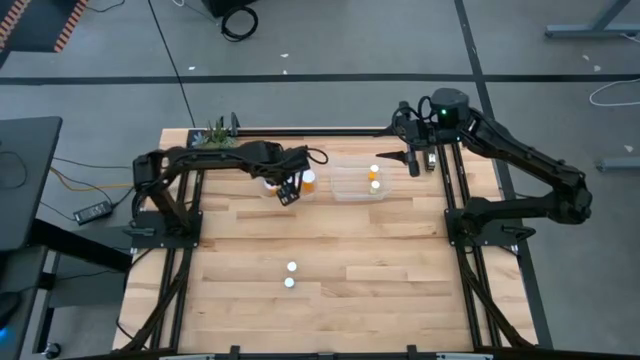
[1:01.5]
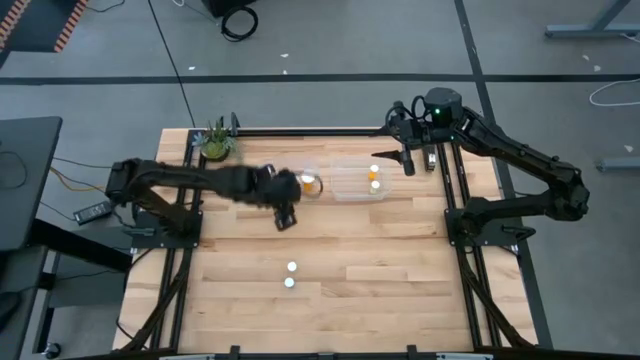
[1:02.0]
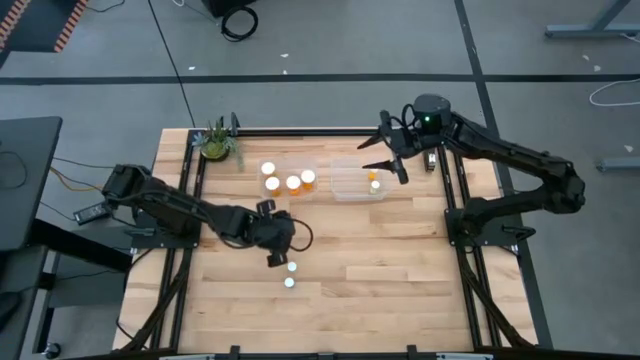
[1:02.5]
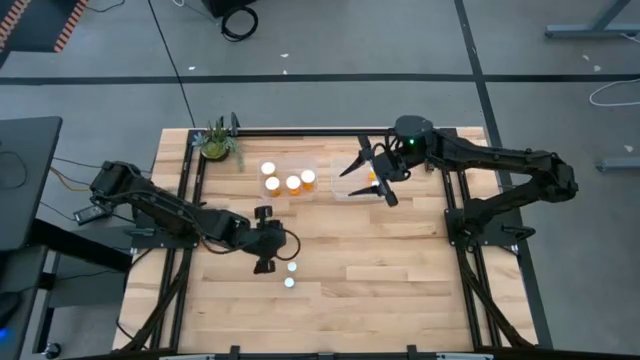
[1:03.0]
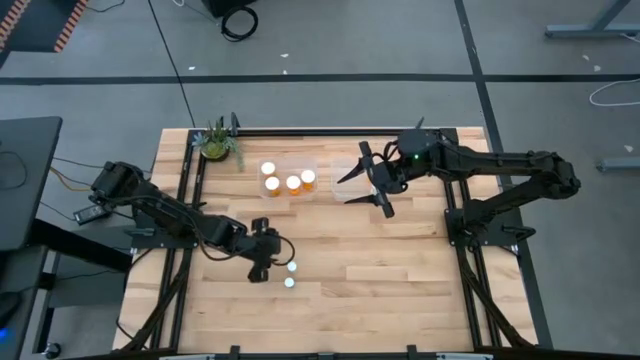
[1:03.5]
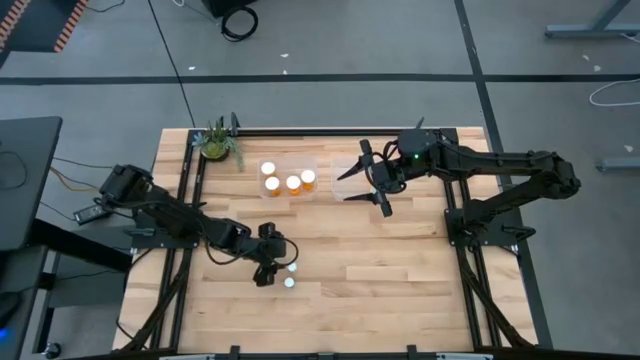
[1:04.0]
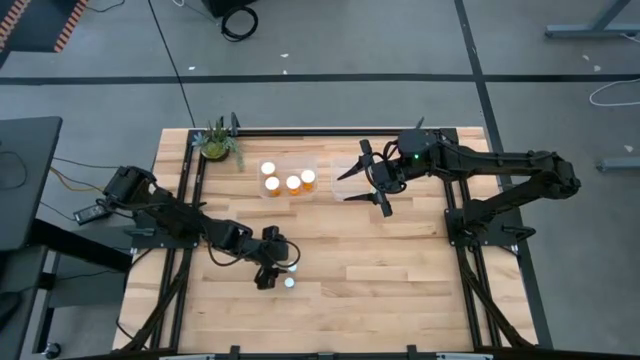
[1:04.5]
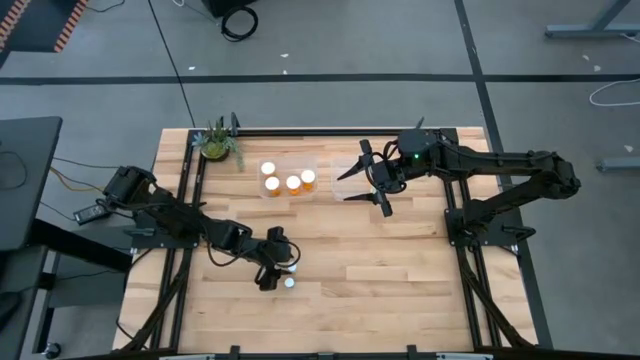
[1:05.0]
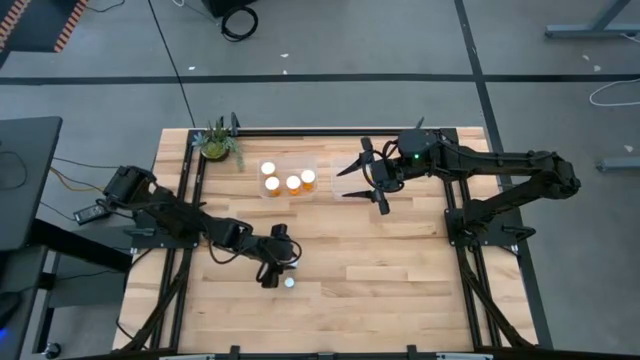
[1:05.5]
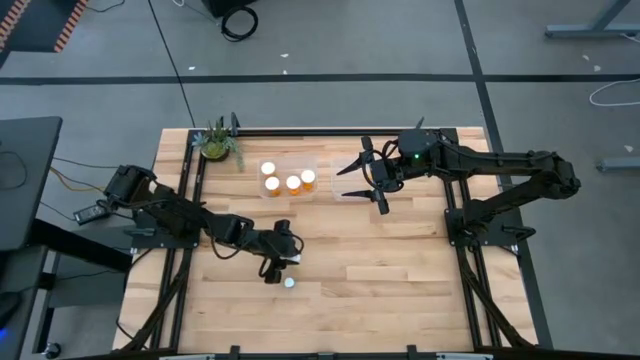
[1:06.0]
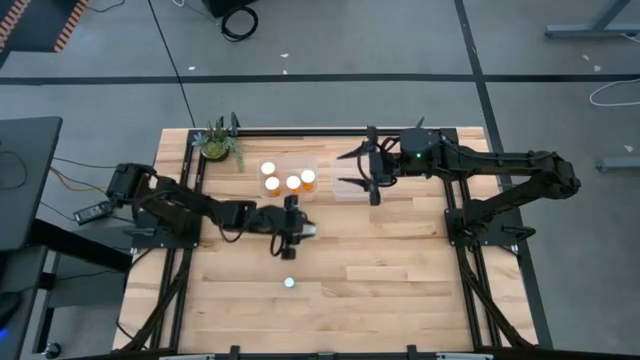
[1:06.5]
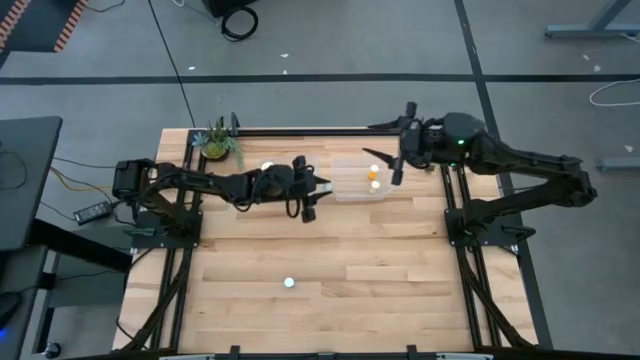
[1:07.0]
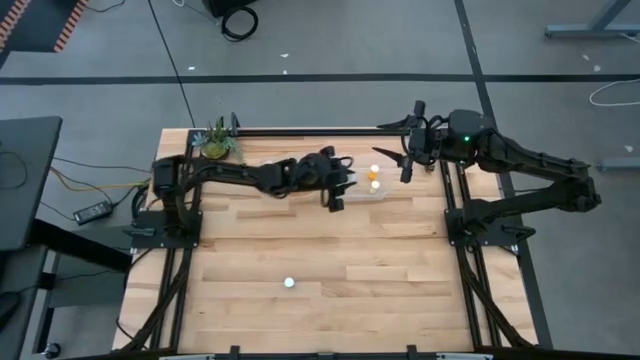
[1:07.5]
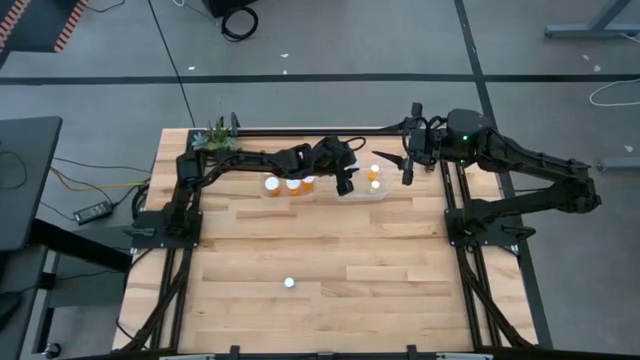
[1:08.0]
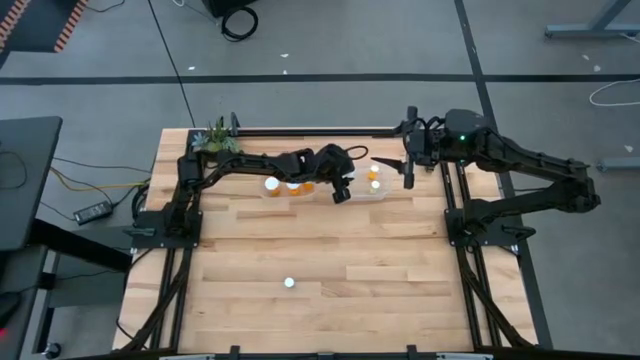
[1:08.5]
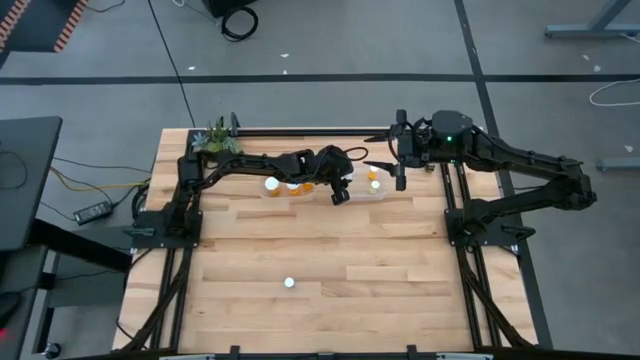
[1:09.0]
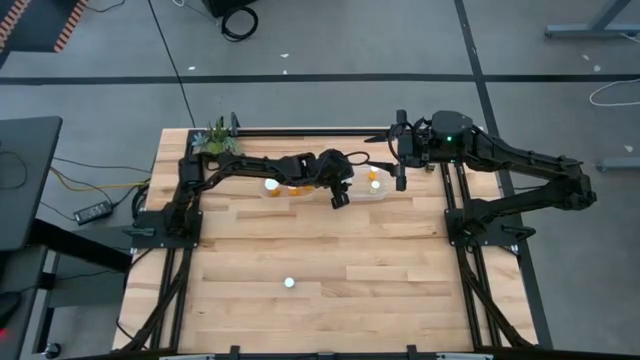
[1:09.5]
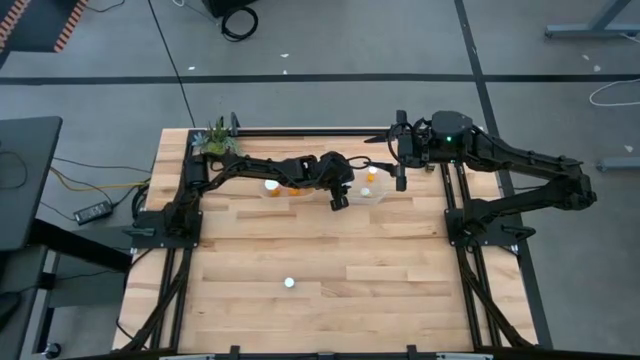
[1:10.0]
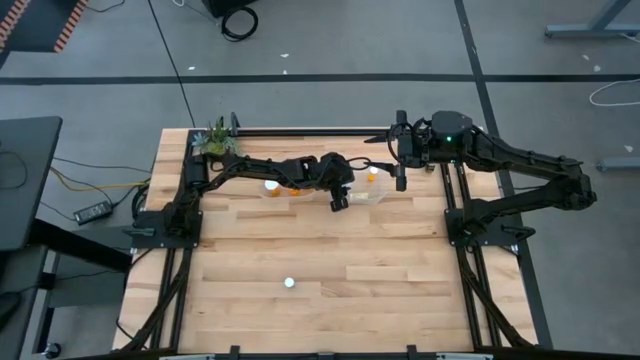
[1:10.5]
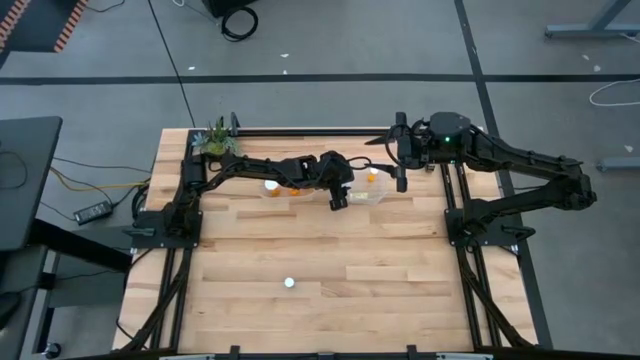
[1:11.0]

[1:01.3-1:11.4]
Task: Pick and place medicine bottles into bin by pill shape (circle, oval)
Put the small yellow pill bottle into the right transparent bin

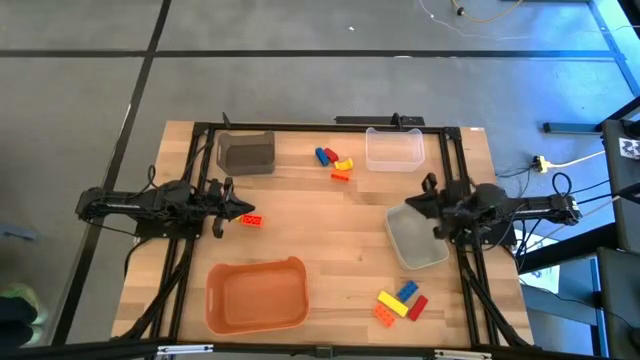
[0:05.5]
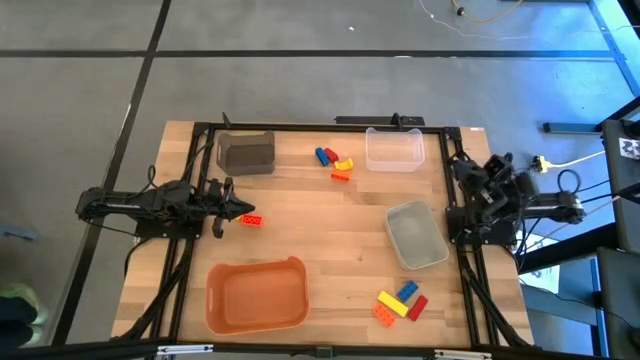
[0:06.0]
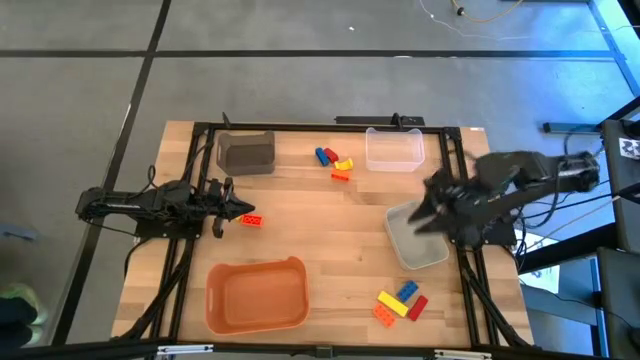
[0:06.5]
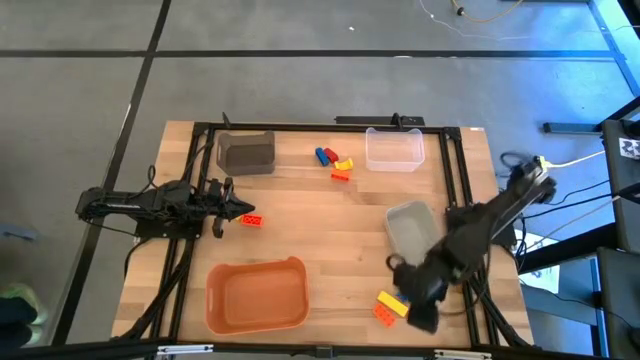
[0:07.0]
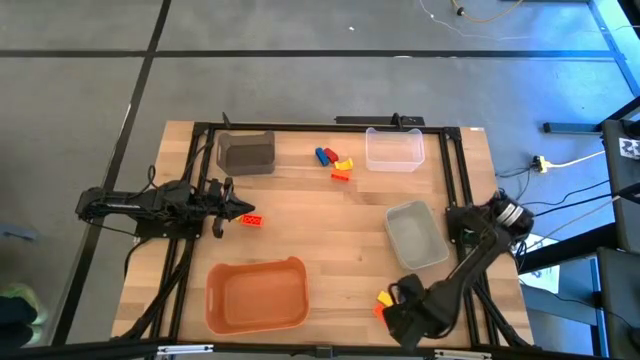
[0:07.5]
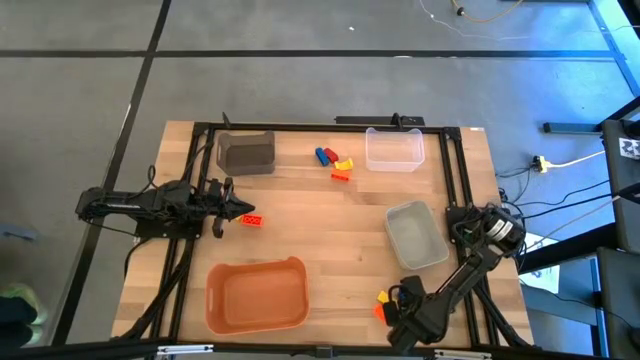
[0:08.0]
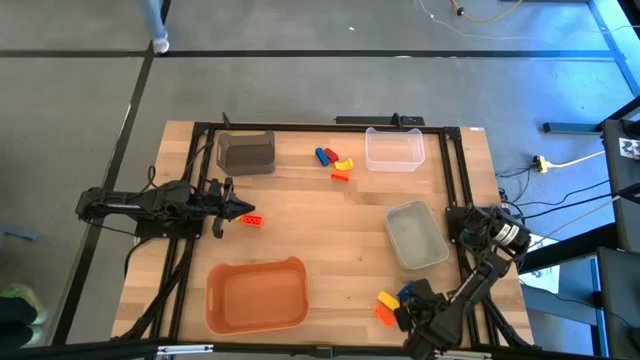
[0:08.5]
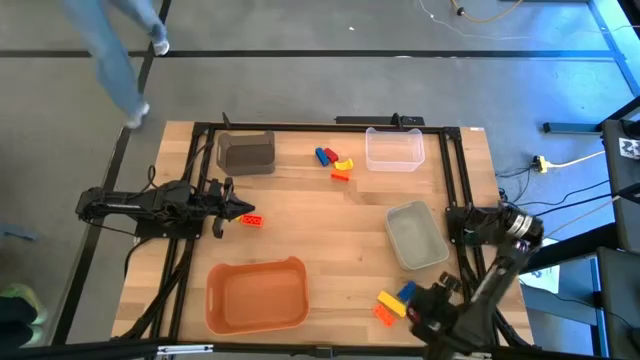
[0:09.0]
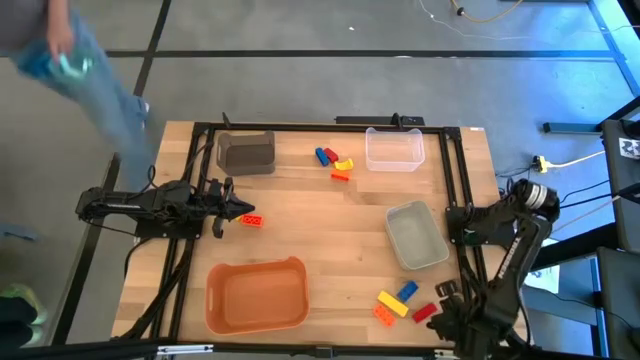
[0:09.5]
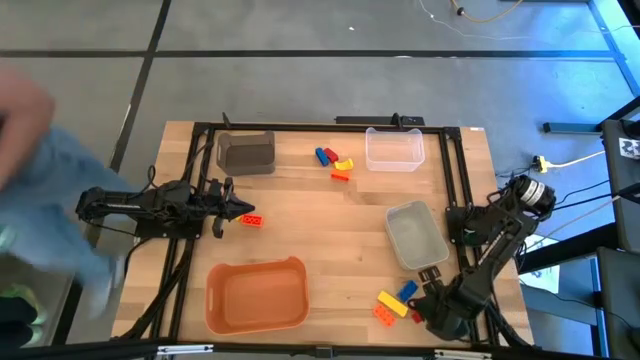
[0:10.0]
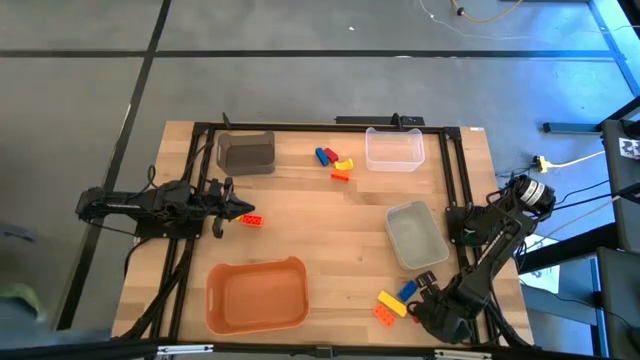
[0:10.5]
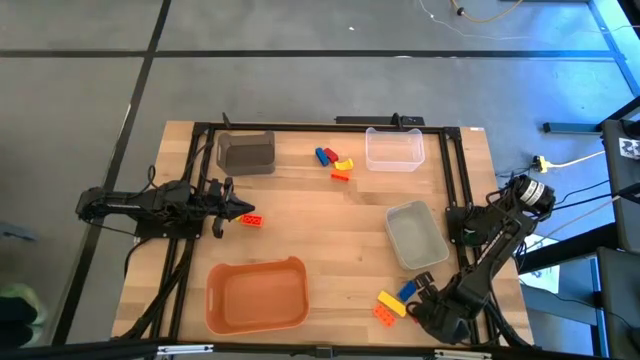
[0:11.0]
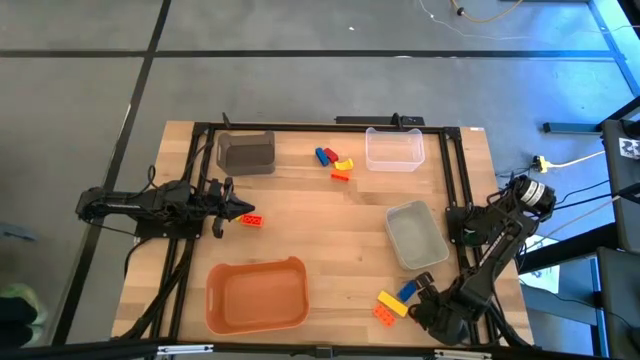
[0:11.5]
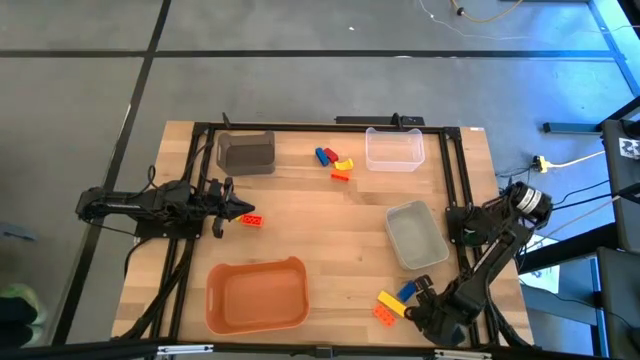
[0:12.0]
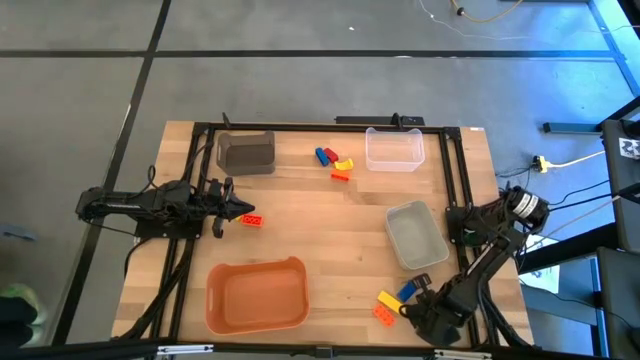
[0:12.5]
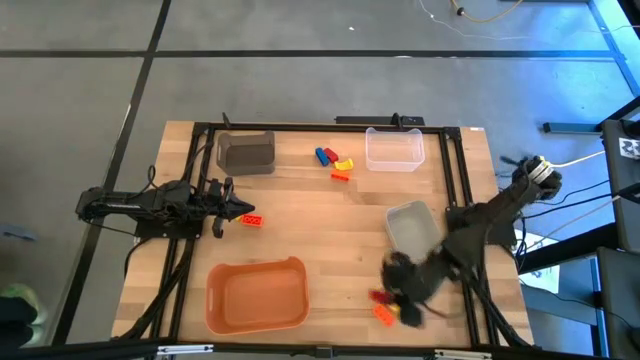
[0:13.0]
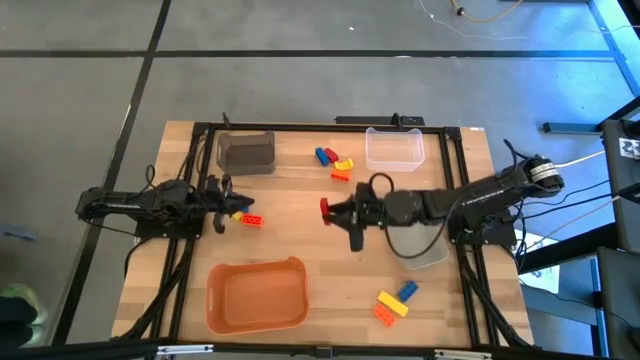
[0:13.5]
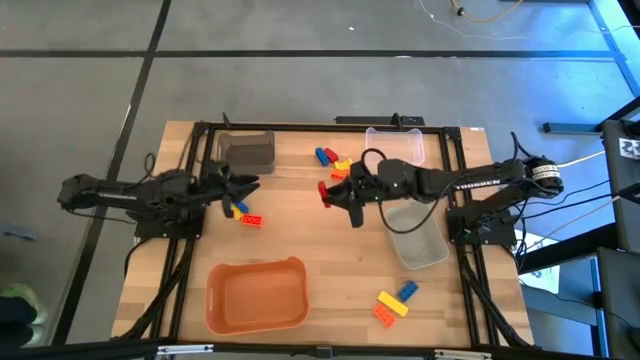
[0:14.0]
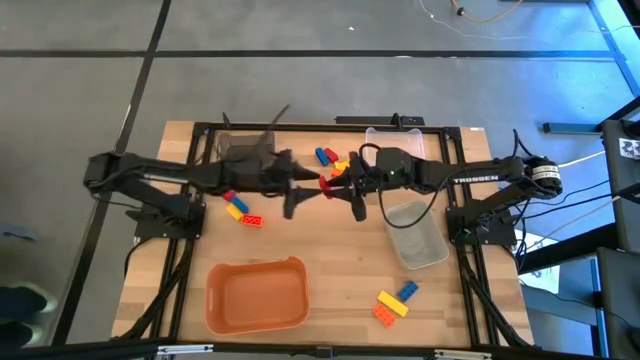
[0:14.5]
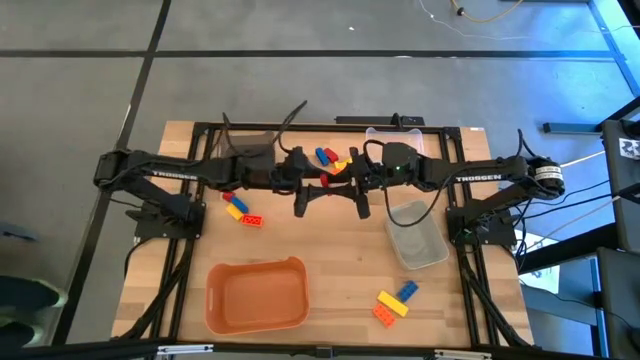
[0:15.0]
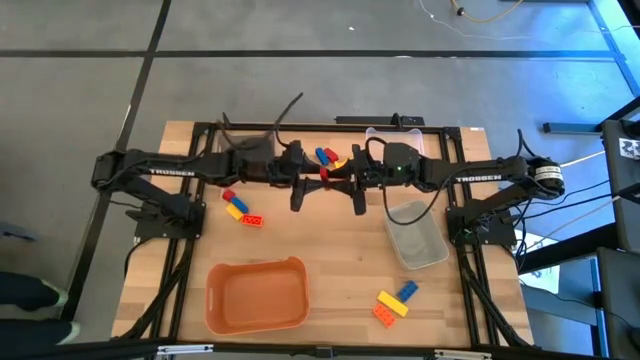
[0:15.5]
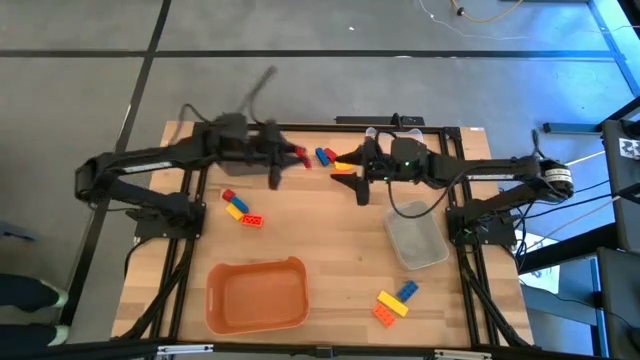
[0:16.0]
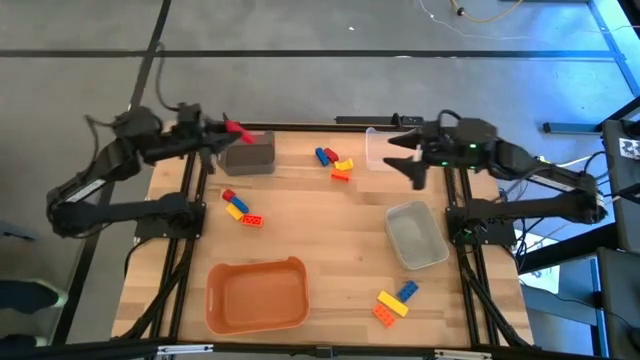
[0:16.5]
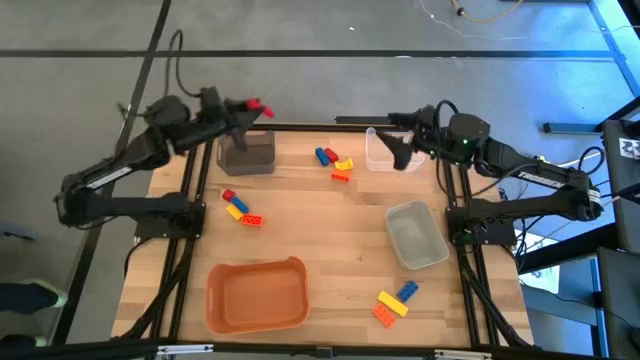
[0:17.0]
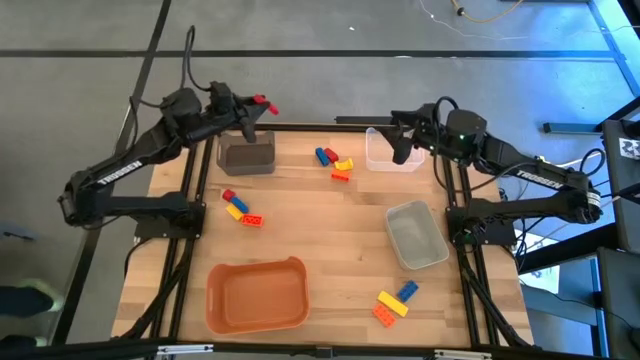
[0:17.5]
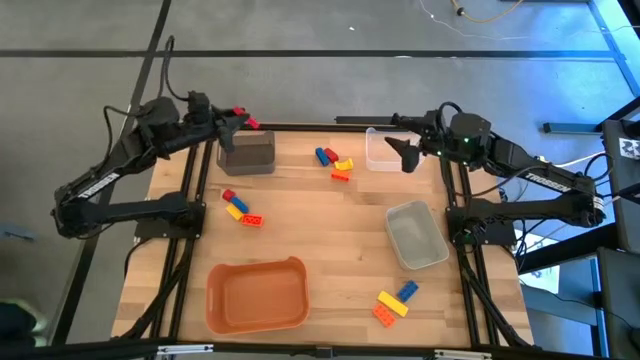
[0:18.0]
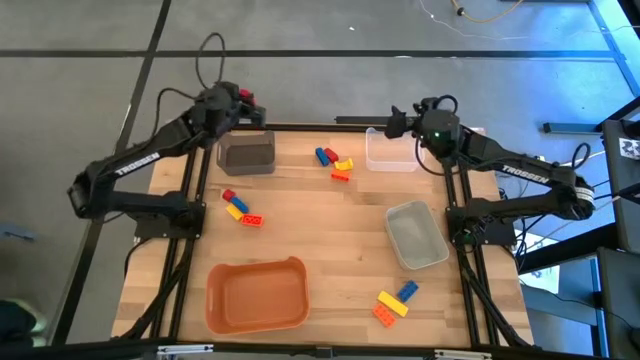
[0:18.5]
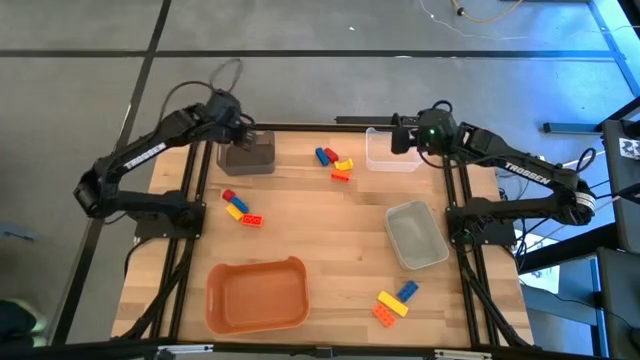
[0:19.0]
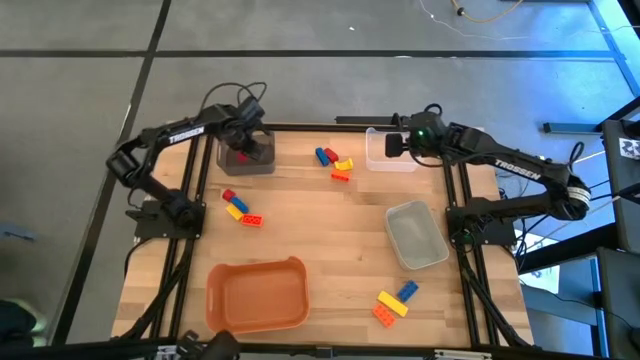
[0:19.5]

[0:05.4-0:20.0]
Task: Sort & place blocks by color
Put the bottom red block into the black bin
